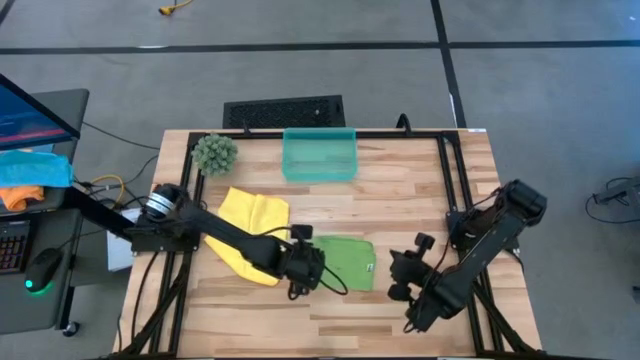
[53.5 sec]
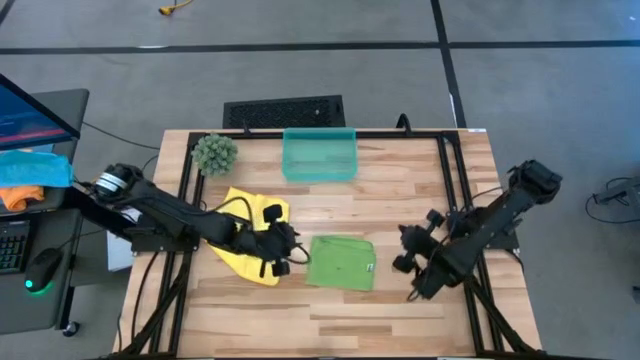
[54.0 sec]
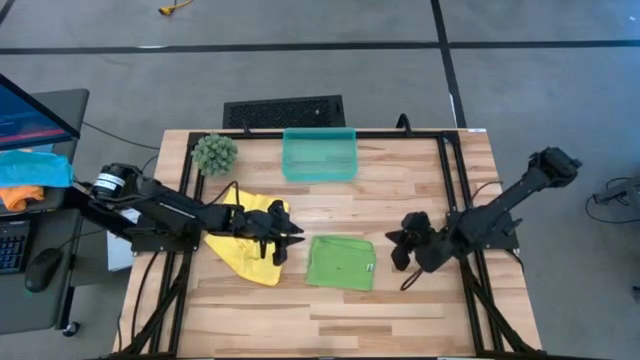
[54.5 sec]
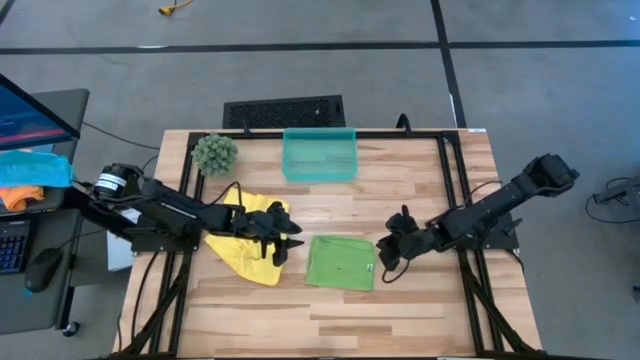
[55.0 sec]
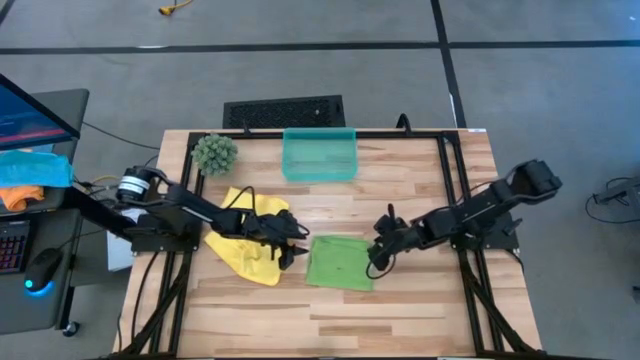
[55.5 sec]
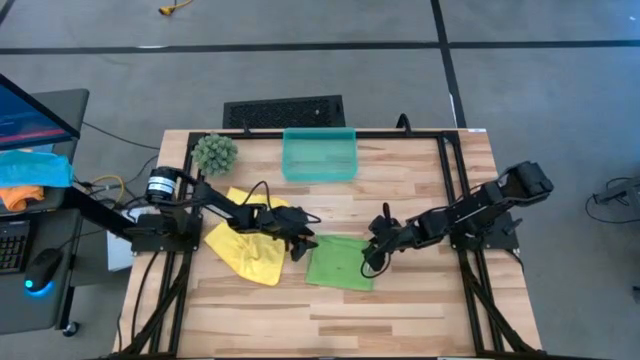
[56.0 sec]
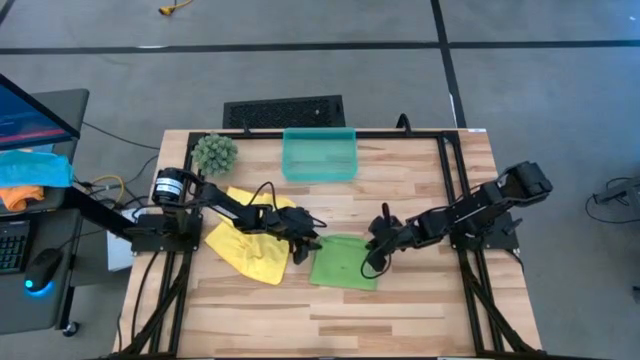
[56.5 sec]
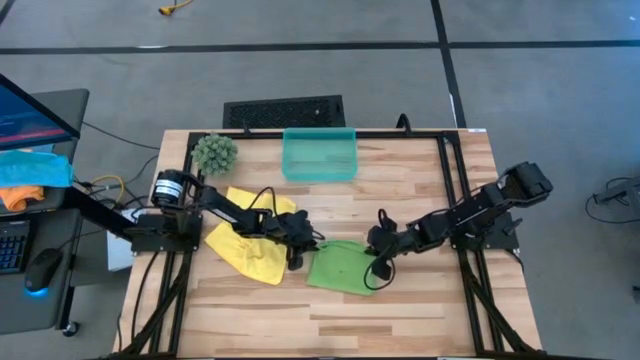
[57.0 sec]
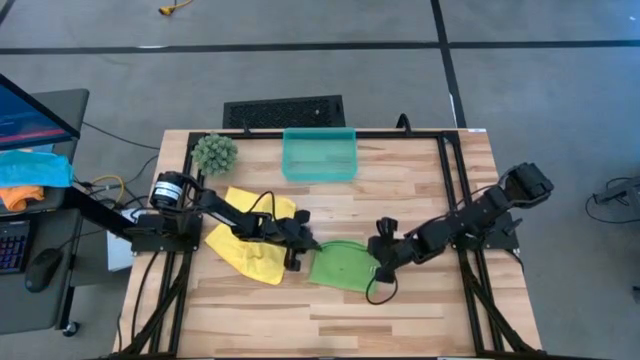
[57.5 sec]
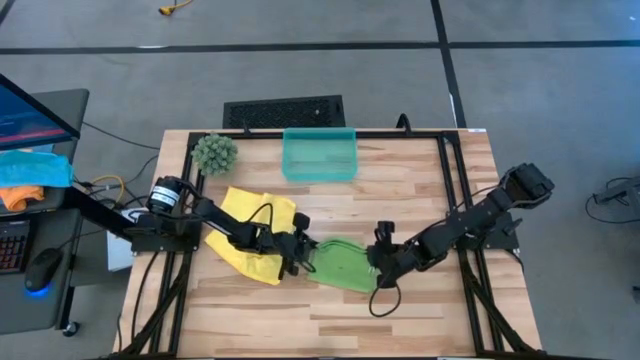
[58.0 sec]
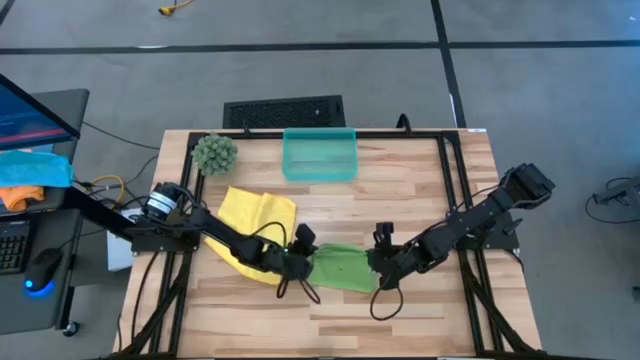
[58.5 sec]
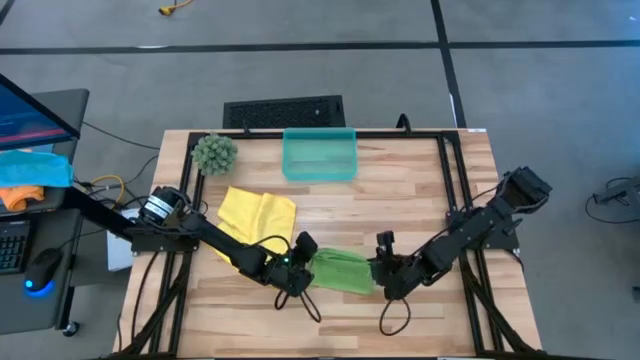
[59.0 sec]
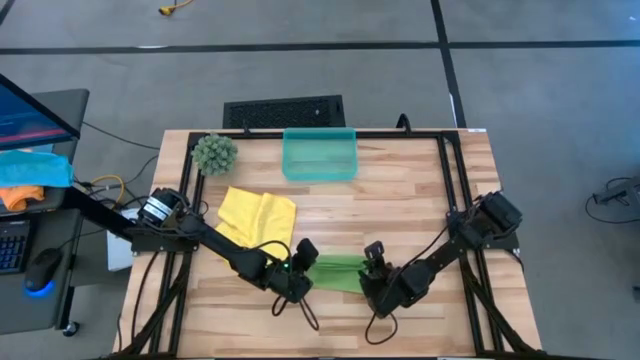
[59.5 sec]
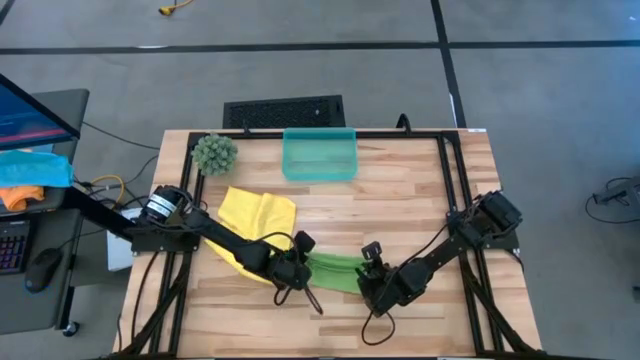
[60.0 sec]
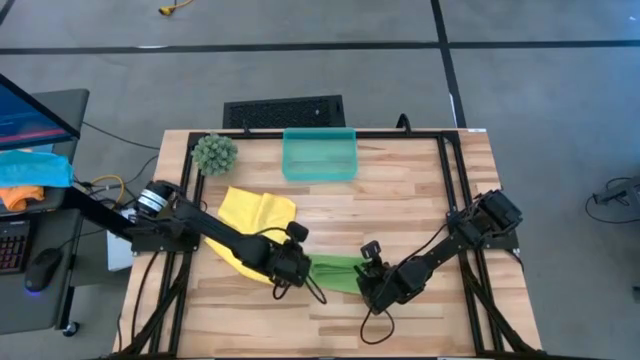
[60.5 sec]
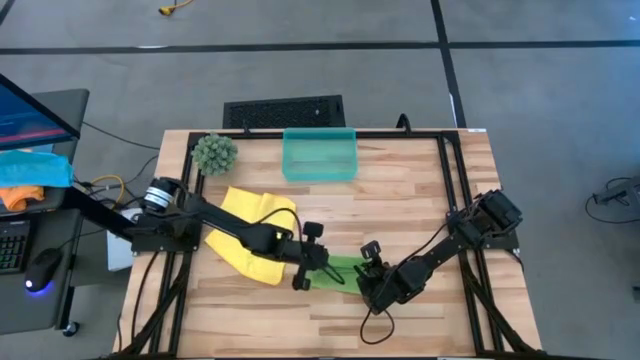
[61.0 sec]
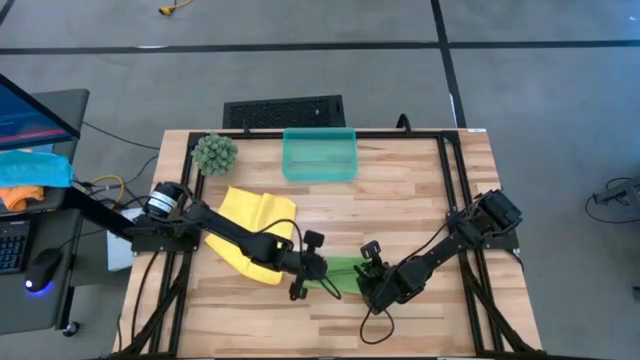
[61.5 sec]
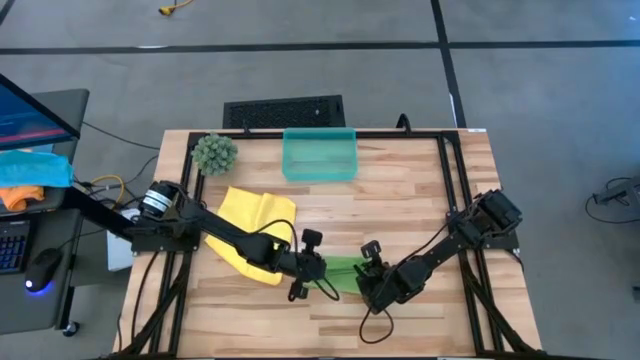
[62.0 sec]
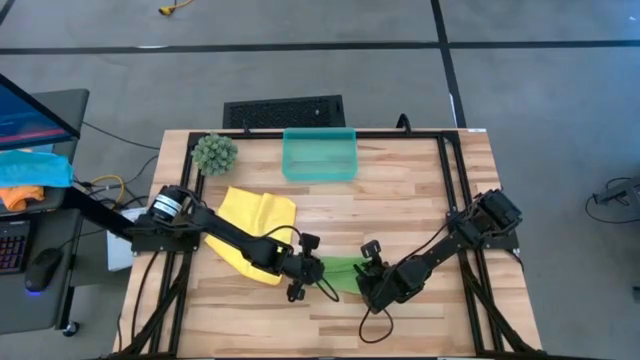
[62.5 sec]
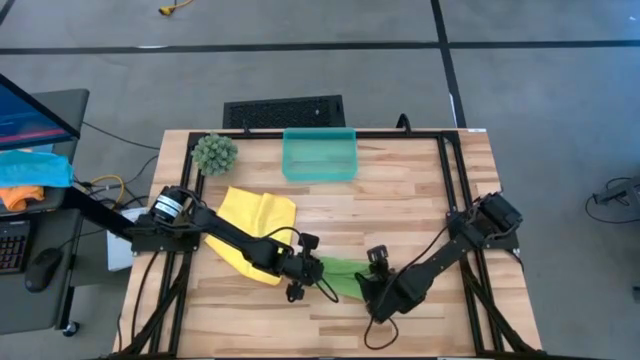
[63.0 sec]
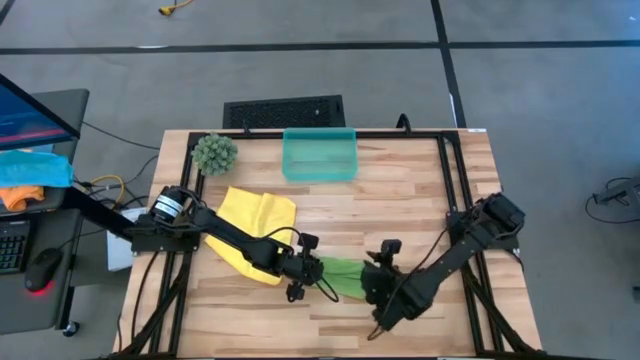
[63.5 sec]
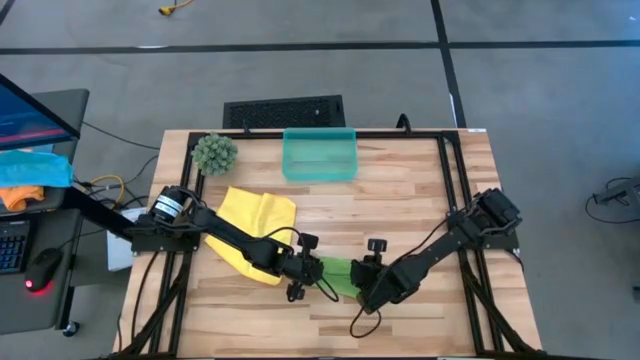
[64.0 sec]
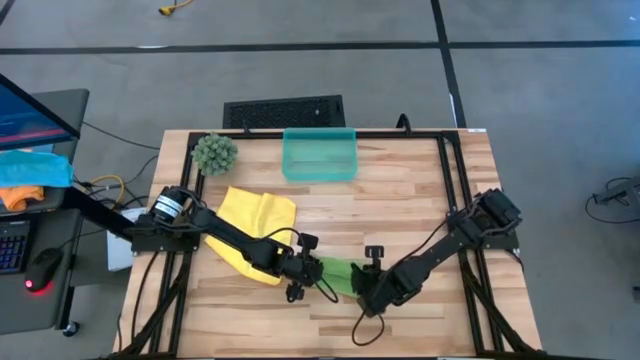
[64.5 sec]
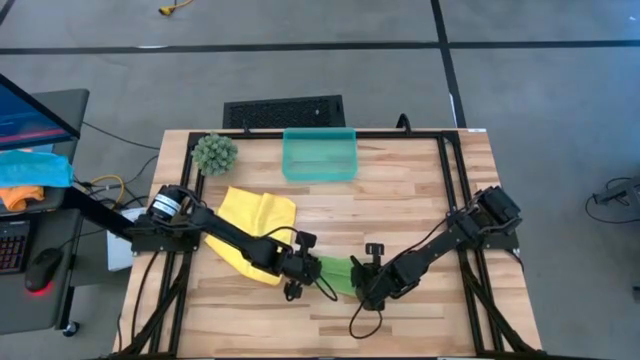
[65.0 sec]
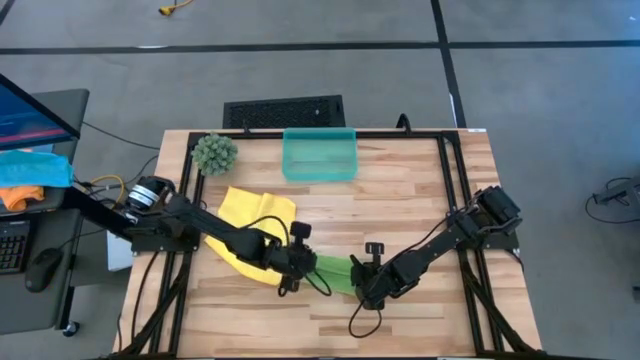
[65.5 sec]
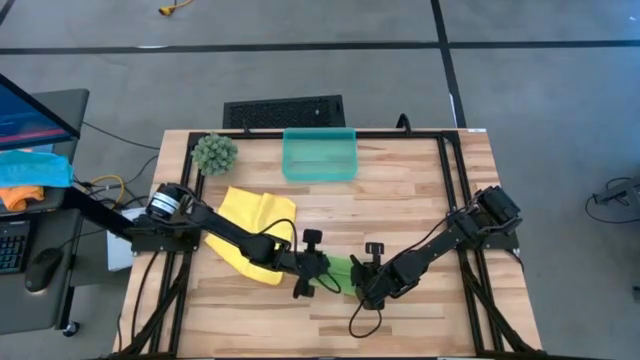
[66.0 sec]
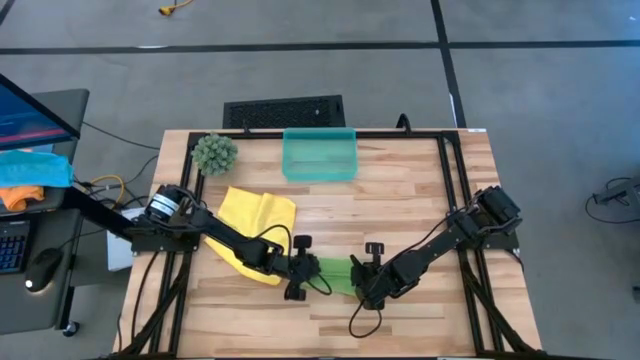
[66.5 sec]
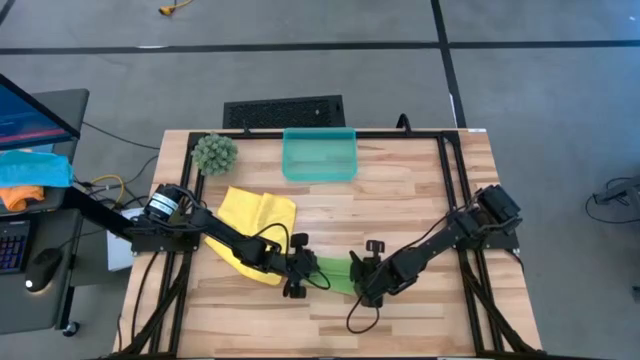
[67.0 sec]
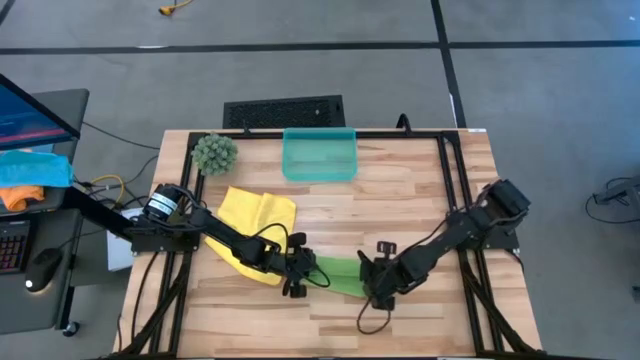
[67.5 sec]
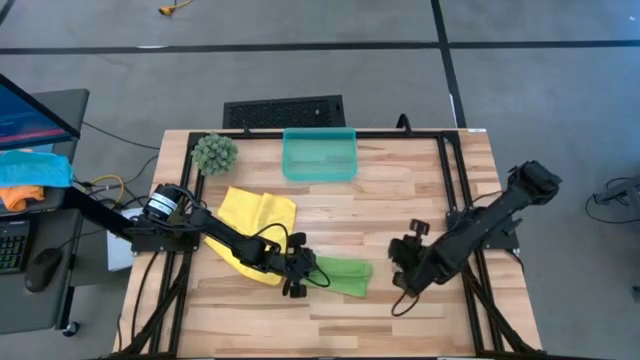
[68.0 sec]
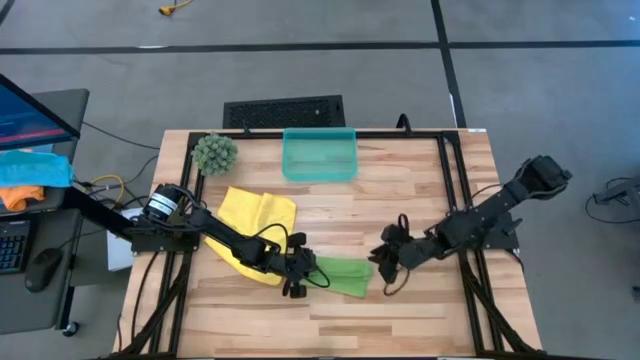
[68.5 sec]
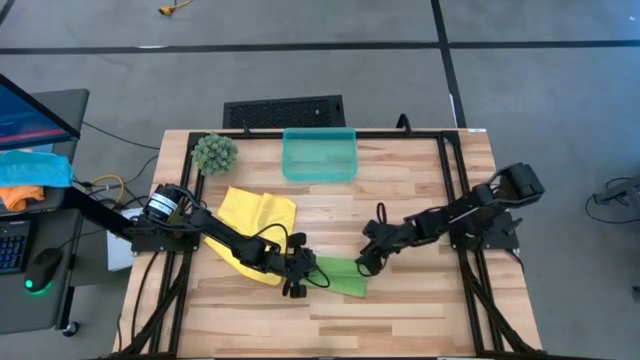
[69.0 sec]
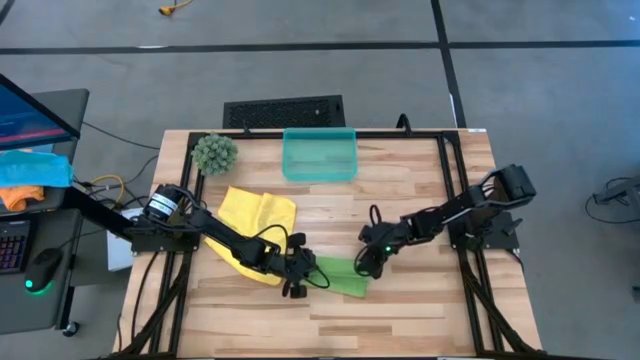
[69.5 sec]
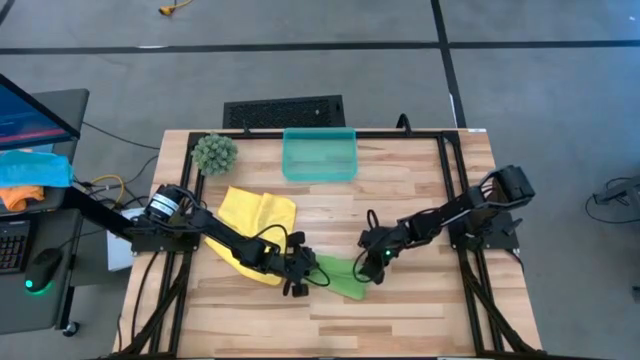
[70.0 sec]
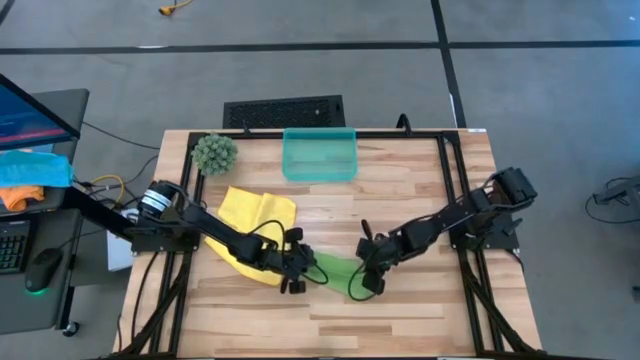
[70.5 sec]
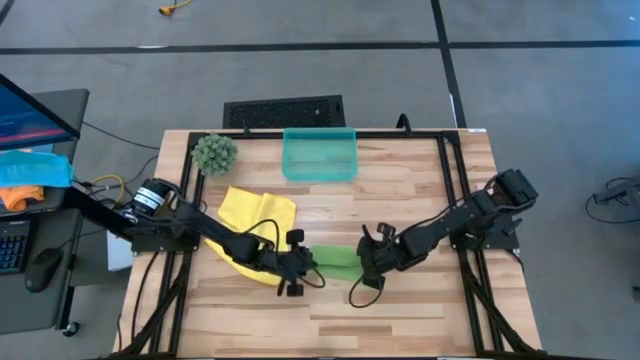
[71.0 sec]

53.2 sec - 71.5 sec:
Task: Roll microfiber towels into tight, uniform cylinder then place into a basket
Roll the green microfiber cloth
